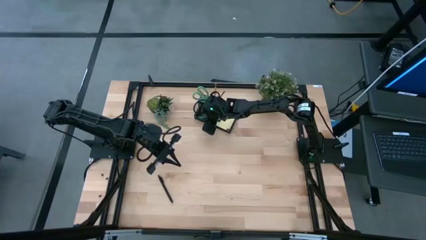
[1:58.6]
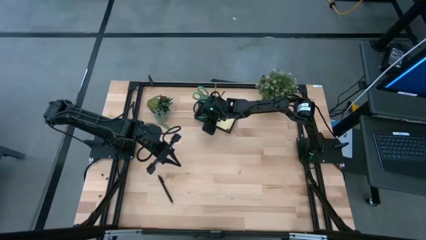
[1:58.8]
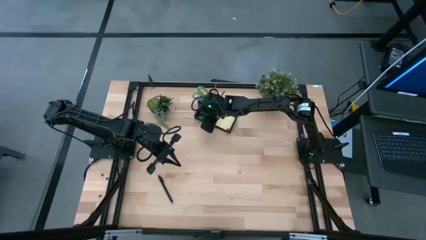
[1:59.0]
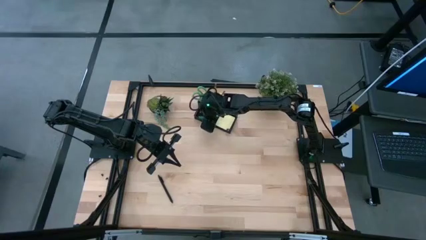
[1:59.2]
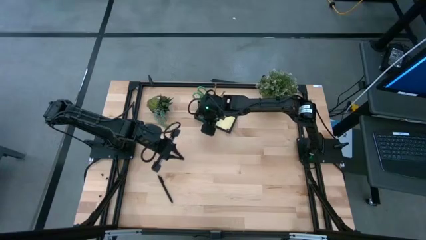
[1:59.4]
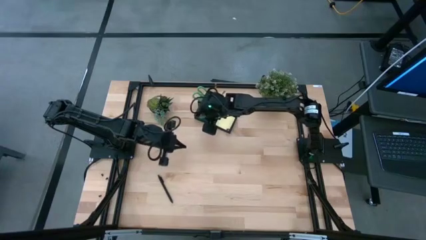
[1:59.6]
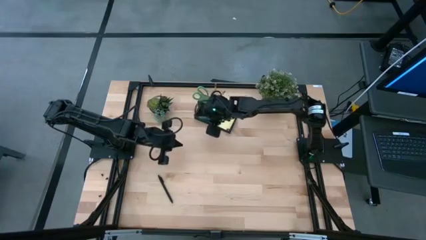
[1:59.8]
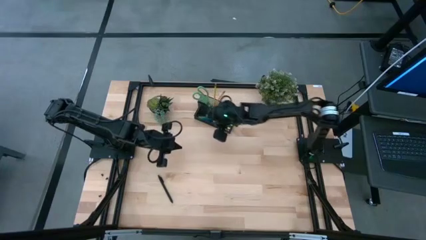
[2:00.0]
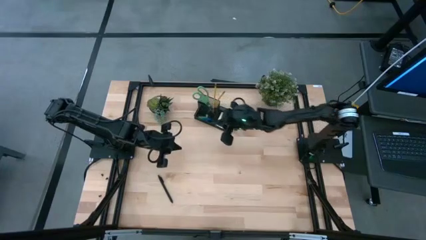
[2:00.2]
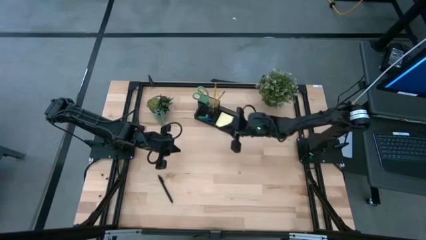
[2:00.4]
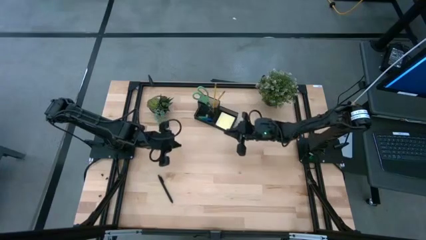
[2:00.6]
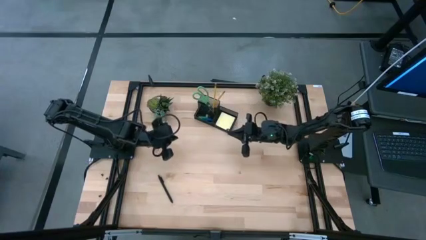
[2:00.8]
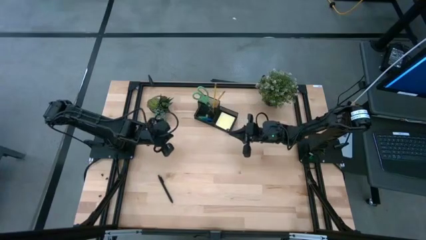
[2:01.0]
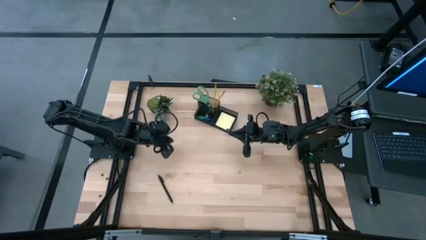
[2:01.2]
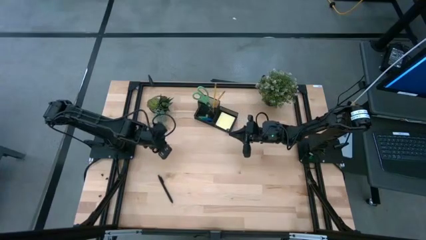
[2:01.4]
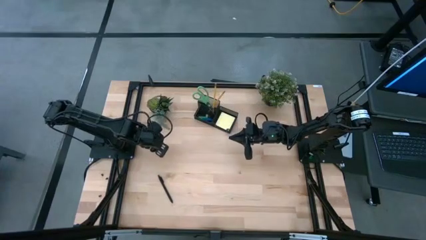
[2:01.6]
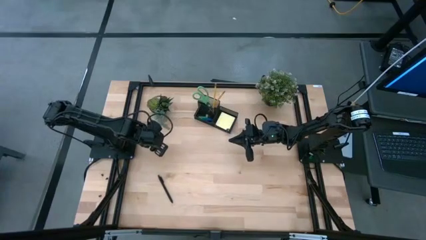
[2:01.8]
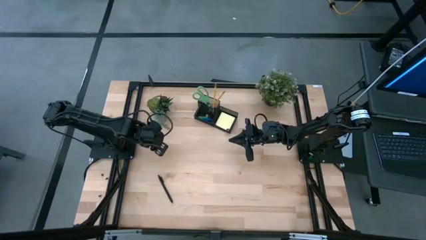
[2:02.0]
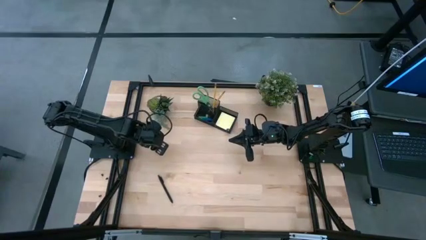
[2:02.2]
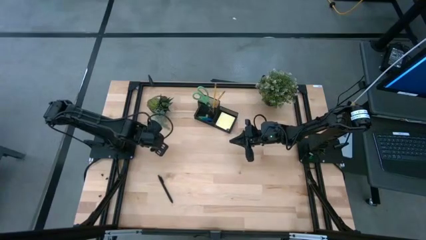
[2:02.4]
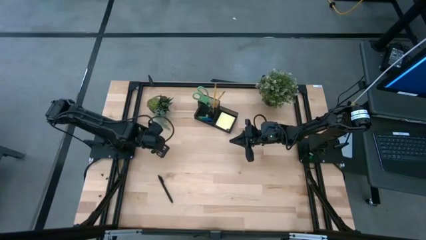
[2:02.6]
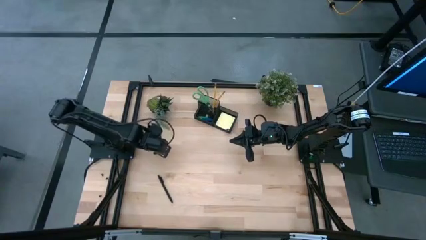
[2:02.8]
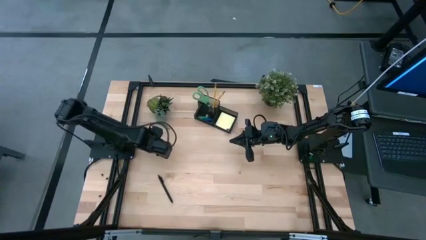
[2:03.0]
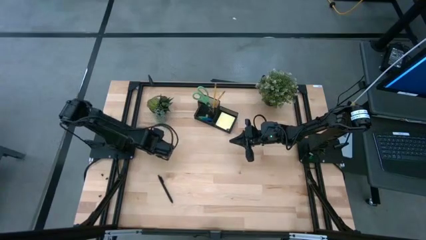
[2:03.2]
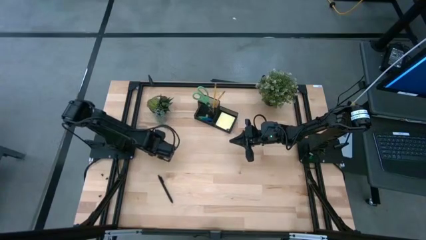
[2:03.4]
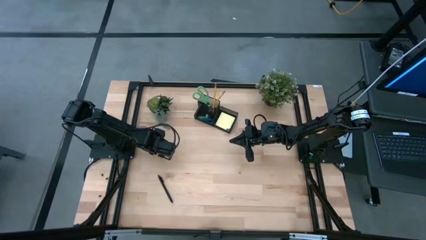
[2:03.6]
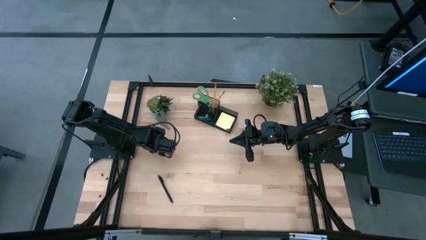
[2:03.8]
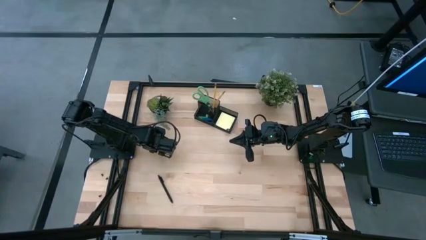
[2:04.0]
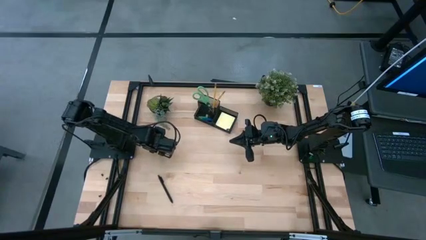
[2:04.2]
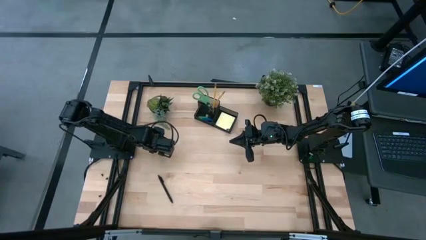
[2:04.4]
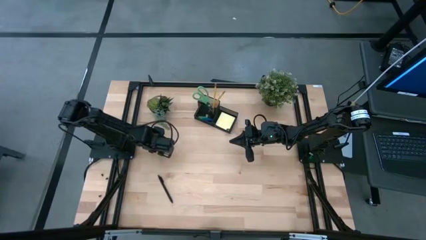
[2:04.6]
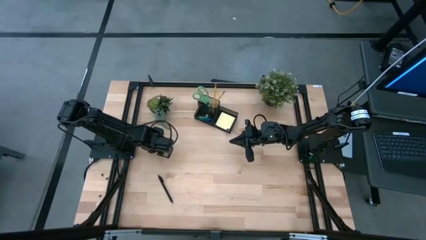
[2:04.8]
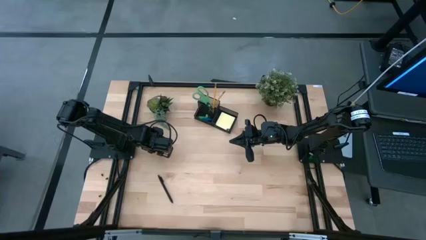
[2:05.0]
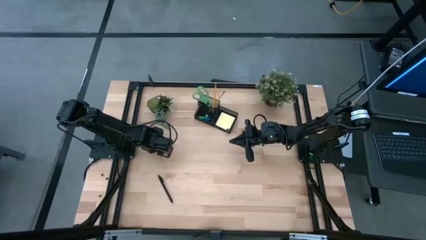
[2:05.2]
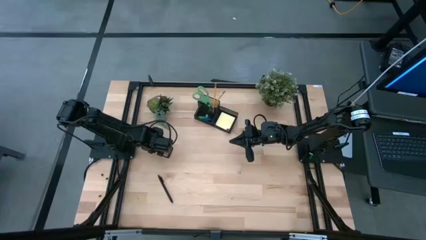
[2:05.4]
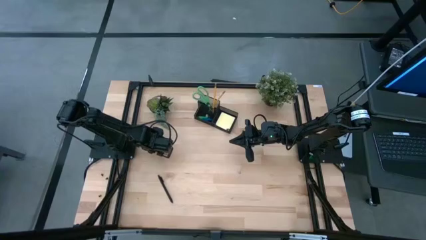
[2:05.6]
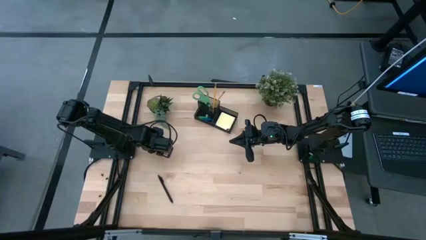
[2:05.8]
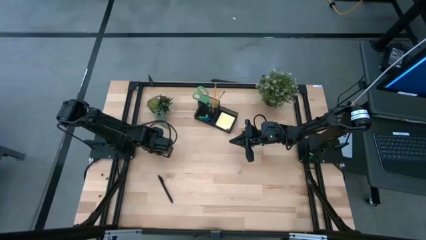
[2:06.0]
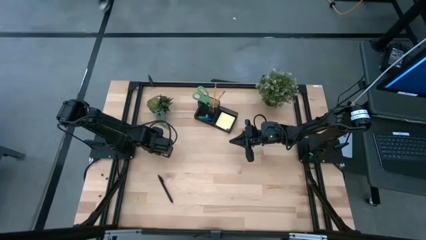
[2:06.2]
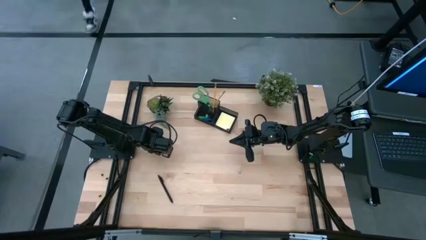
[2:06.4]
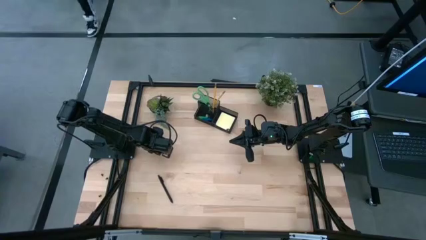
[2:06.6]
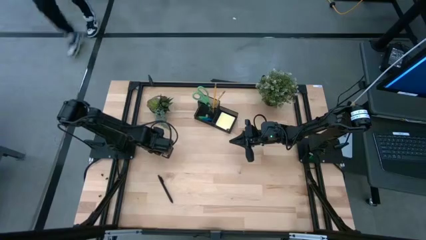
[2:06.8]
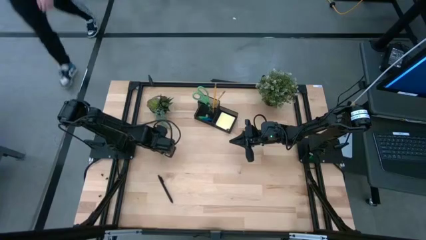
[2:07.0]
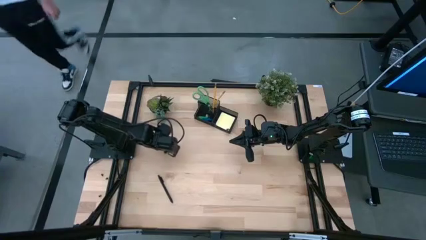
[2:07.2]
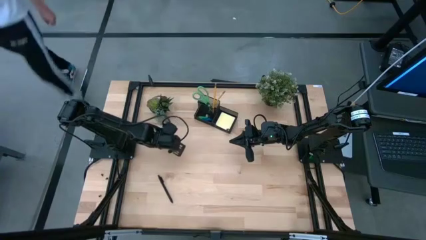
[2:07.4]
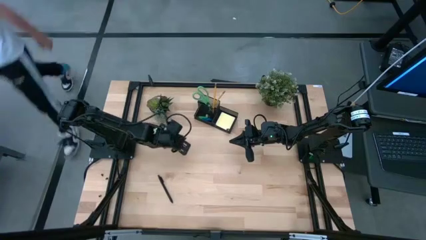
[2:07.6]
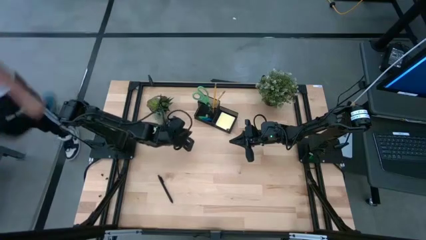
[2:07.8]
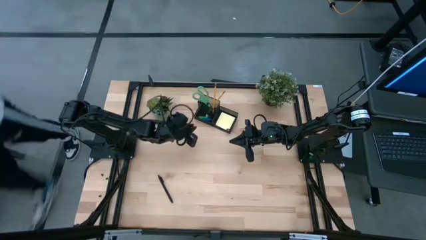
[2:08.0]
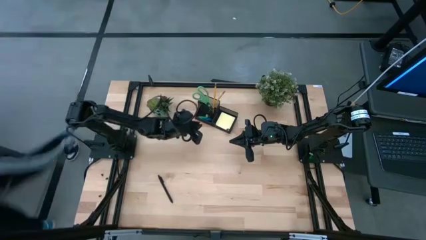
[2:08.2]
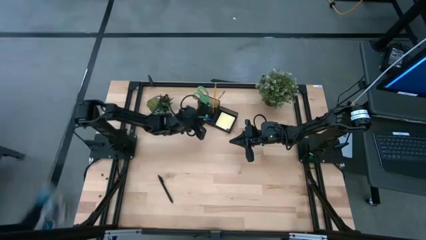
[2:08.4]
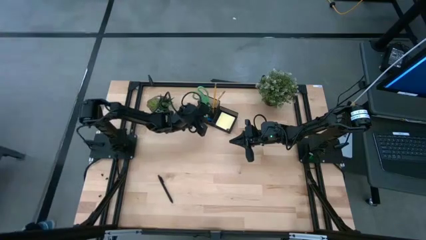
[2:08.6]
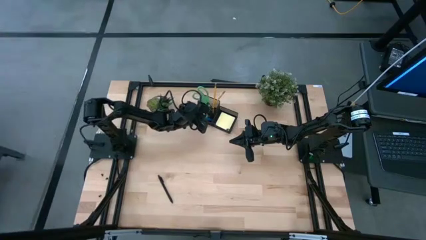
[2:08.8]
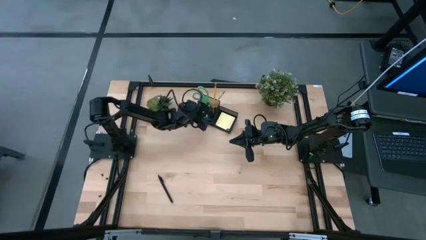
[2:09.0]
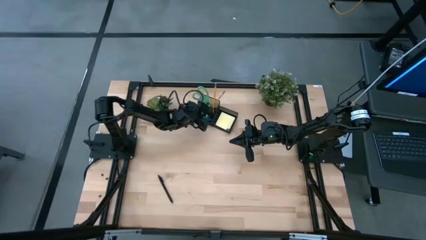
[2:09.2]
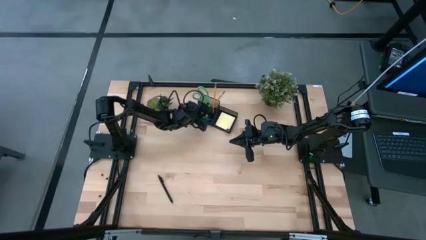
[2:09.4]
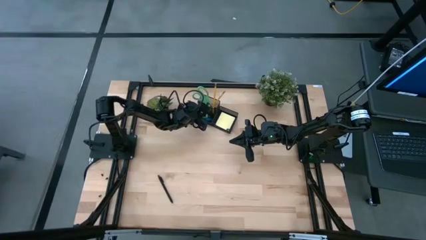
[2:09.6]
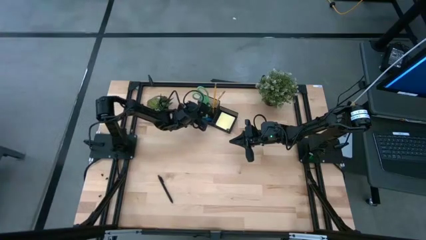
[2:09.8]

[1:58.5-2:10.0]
Task: Pick and place office supplies into organizer
Put the binder clip into the desk organizer

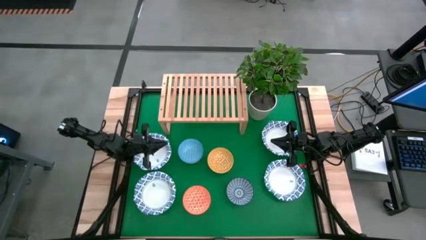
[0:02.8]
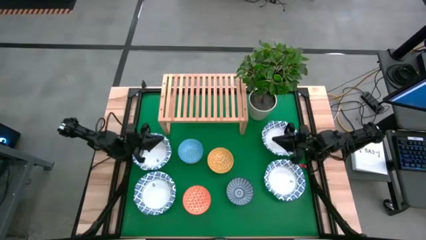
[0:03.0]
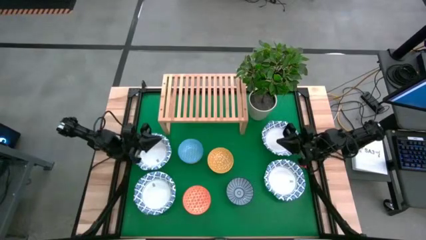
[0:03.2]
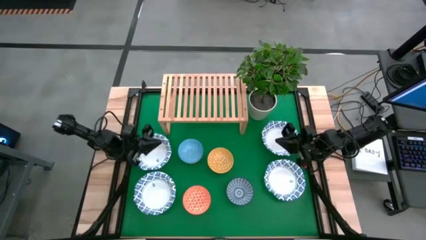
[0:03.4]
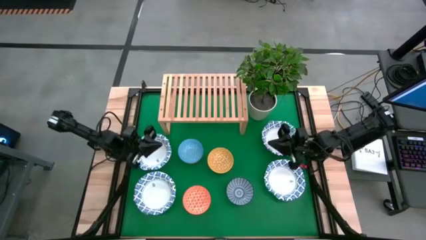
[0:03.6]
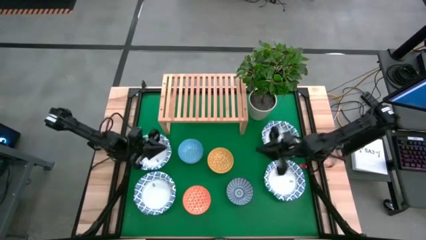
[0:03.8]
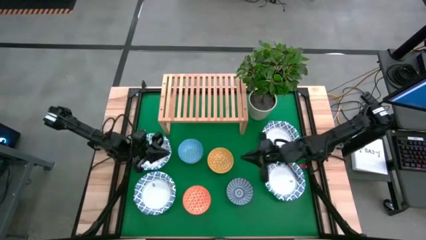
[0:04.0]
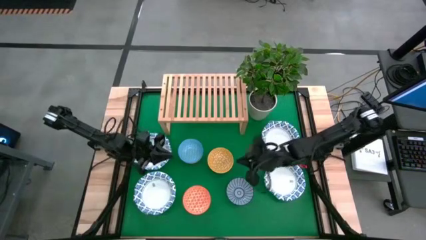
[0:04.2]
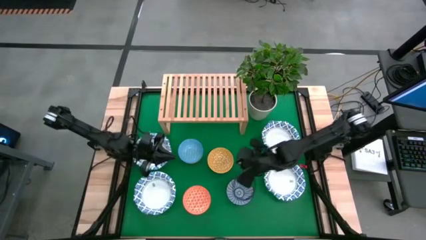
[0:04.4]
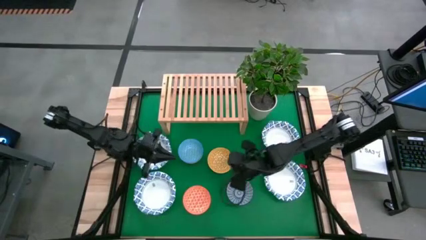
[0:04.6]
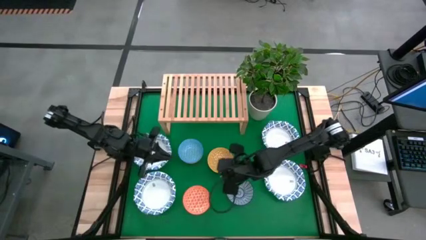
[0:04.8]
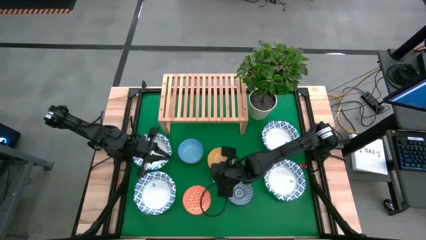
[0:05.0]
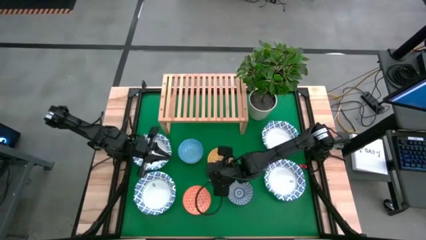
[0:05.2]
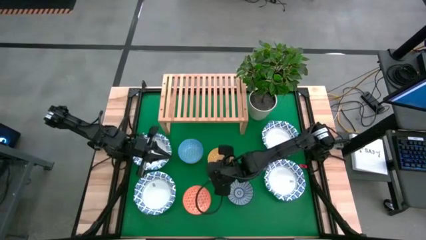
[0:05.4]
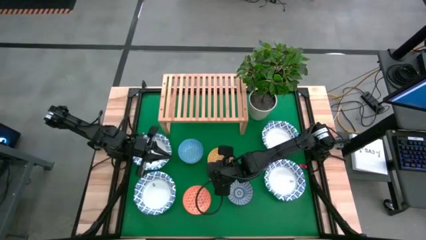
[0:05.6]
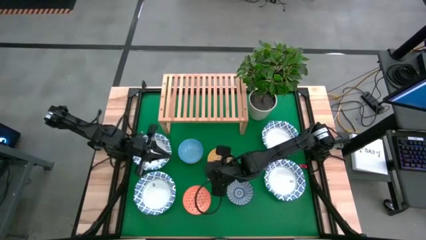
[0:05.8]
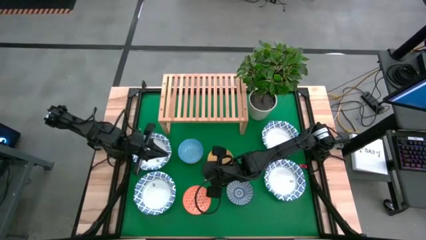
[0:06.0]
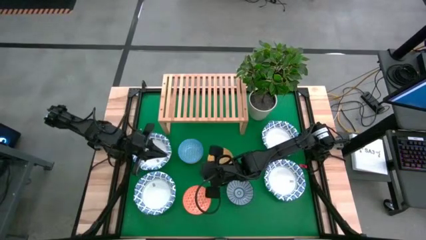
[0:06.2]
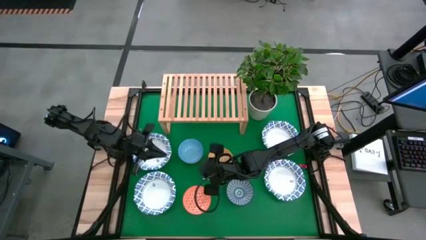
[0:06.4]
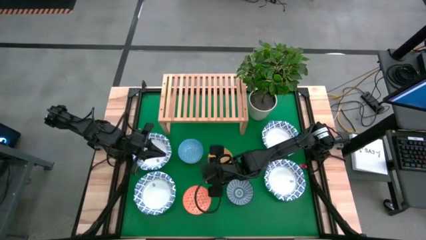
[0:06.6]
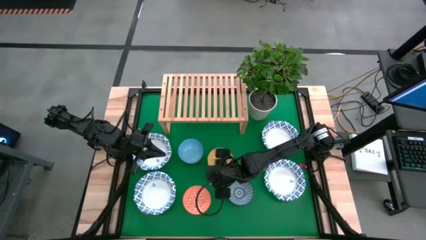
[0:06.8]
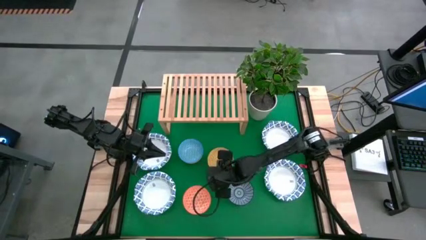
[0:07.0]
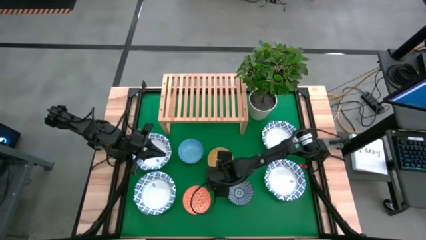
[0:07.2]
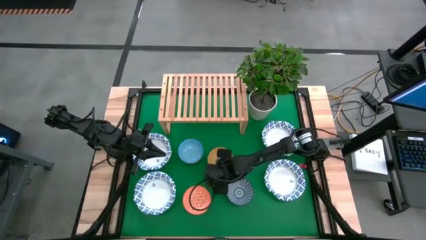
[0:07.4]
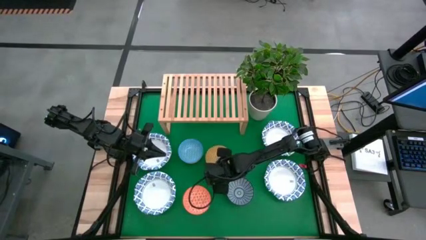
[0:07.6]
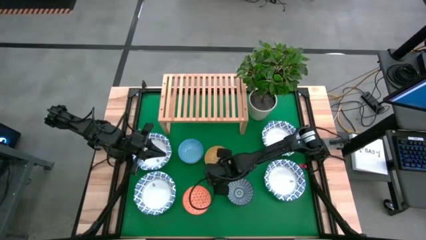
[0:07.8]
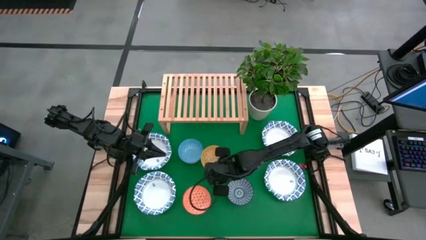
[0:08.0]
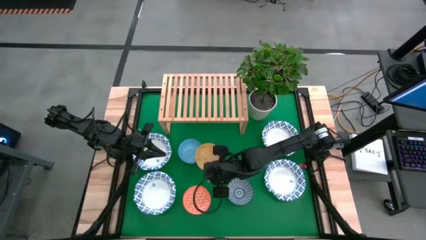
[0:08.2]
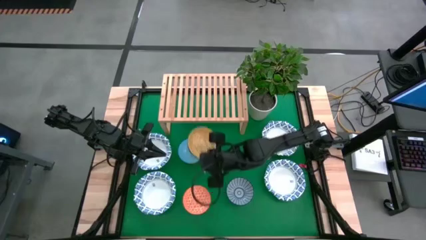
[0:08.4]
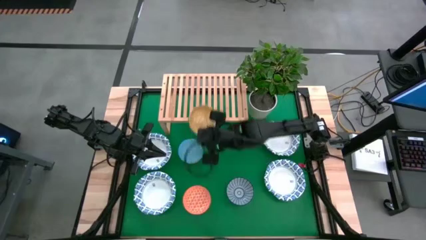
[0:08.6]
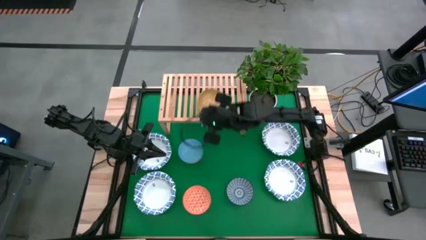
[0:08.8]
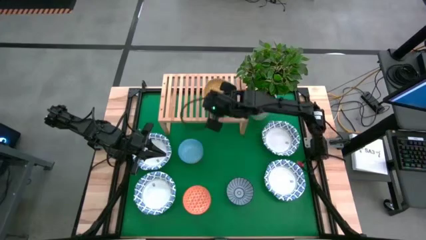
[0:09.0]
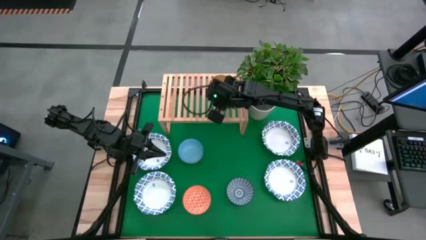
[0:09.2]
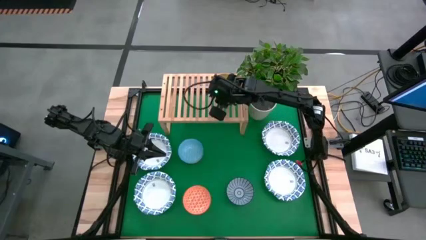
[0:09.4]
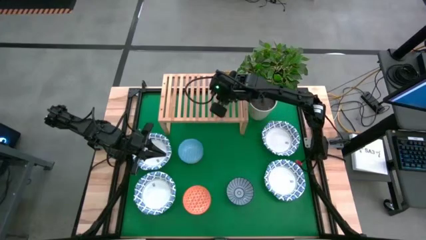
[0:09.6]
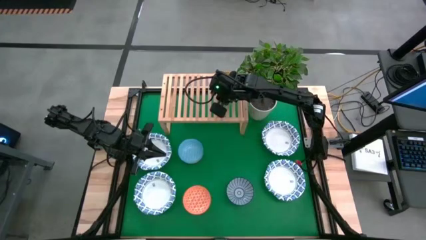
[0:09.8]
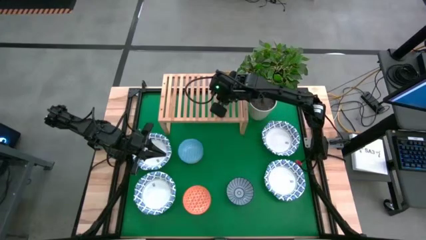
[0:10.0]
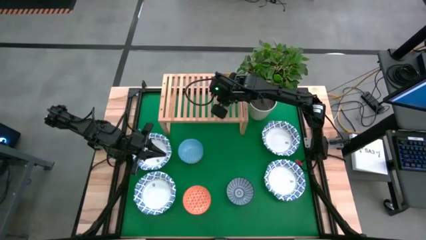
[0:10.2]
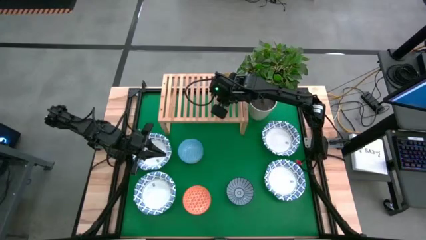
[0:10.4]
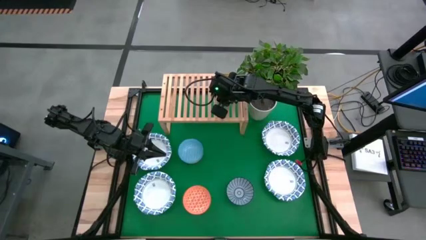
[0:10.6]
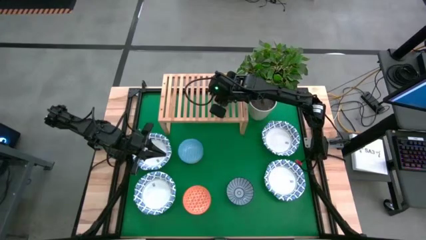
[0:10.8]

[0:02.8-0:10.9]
Task: Place and stack bowls onto a shelf
Put the small yellow bowl on the shelf
